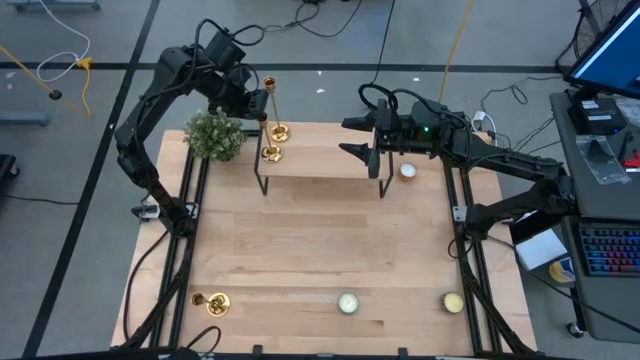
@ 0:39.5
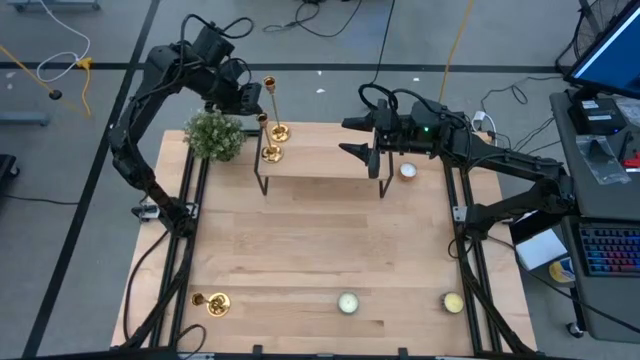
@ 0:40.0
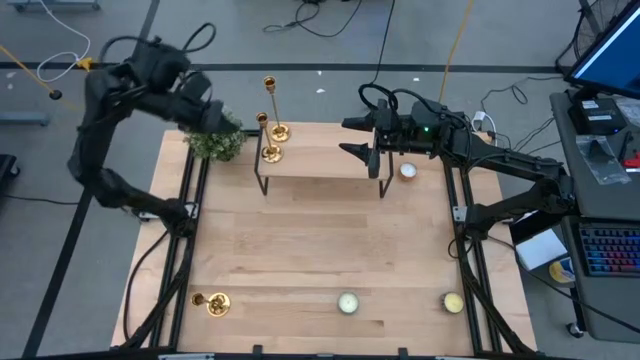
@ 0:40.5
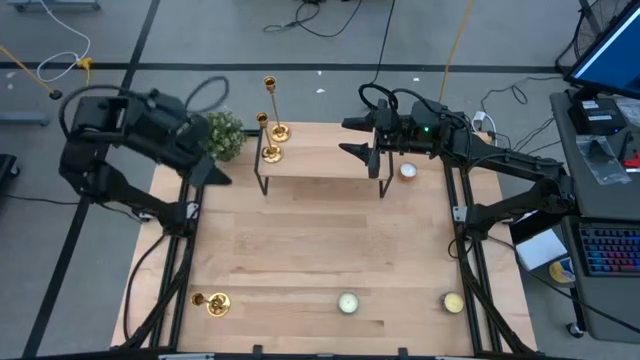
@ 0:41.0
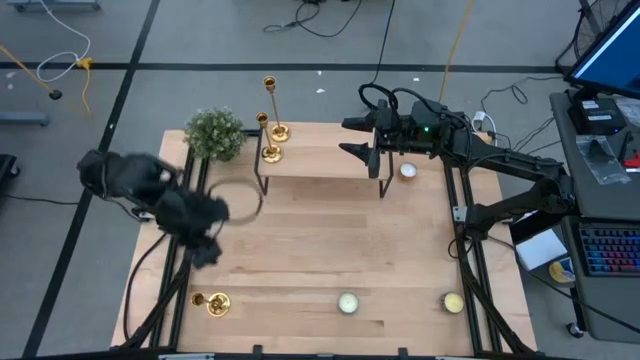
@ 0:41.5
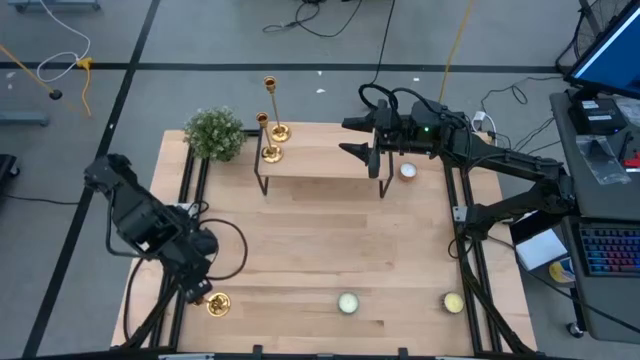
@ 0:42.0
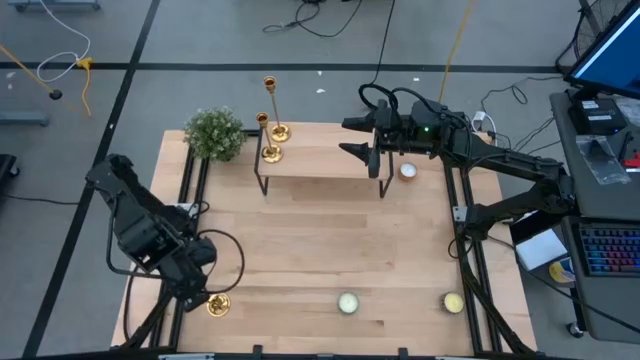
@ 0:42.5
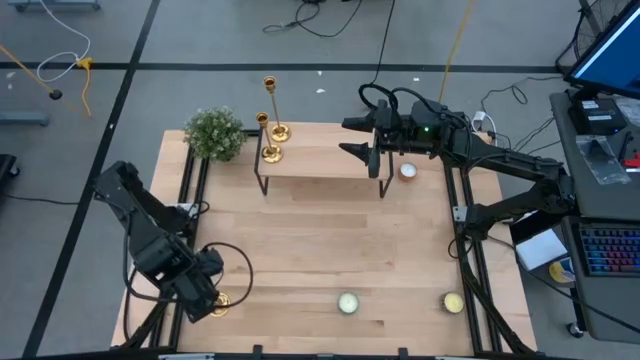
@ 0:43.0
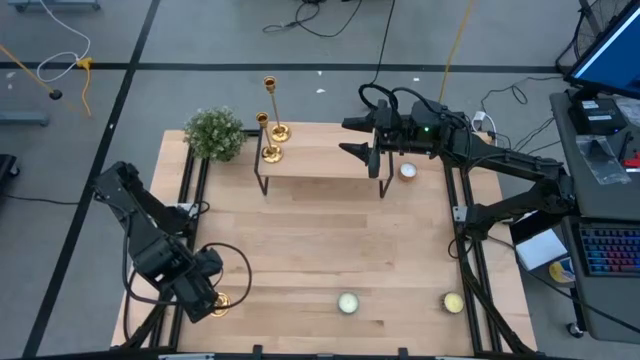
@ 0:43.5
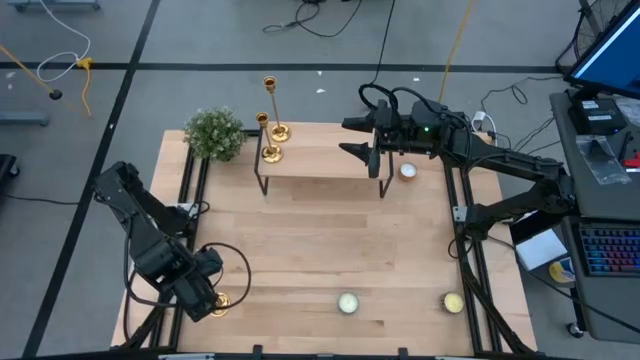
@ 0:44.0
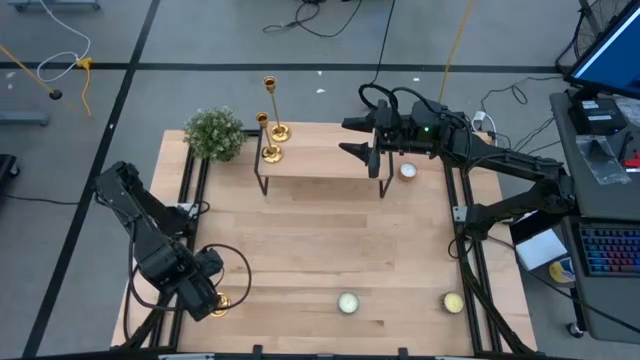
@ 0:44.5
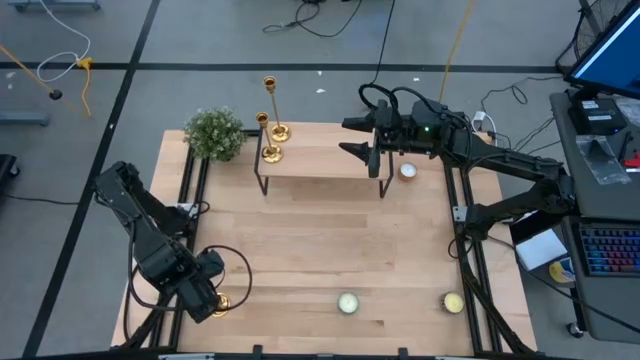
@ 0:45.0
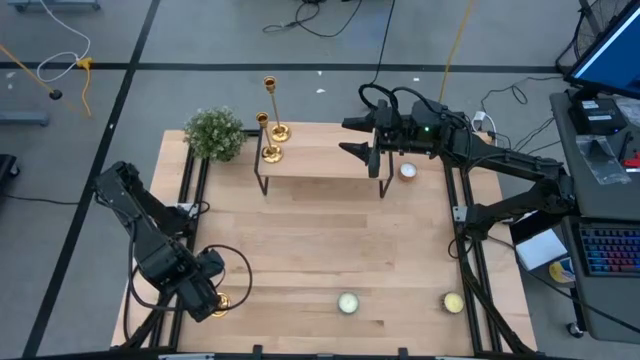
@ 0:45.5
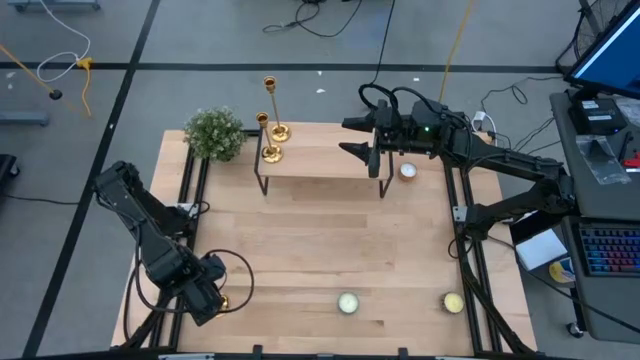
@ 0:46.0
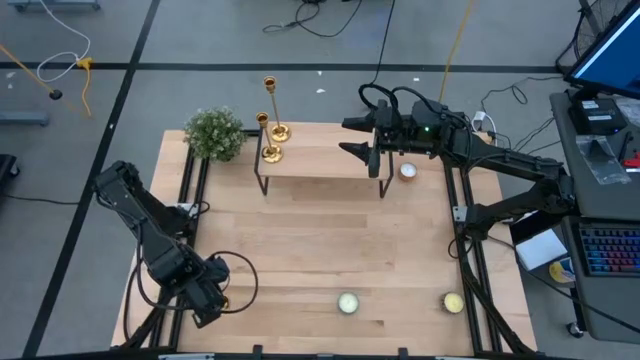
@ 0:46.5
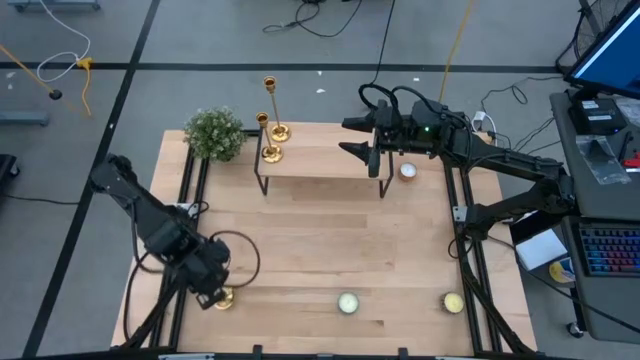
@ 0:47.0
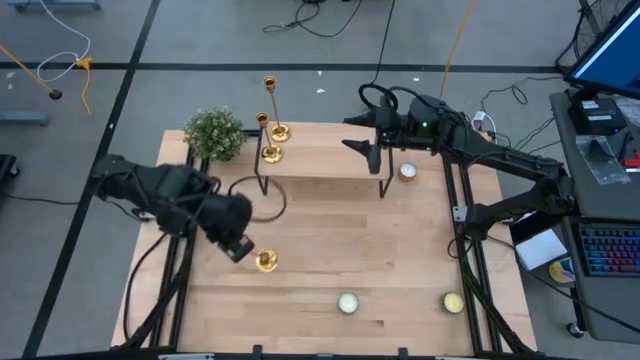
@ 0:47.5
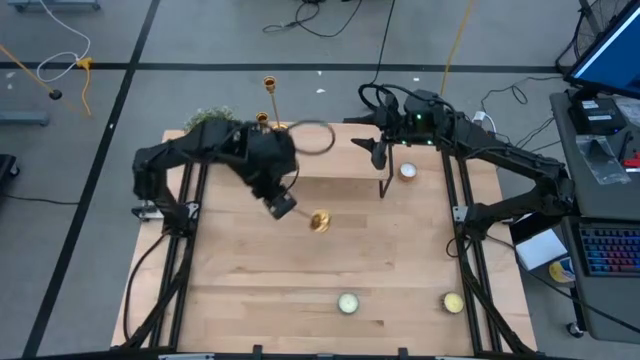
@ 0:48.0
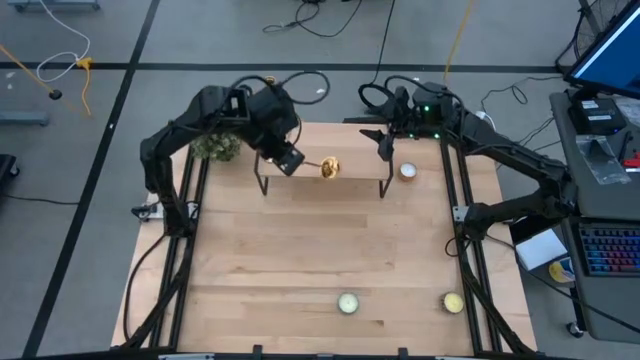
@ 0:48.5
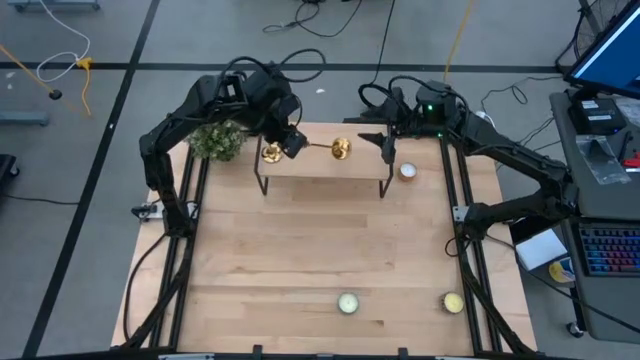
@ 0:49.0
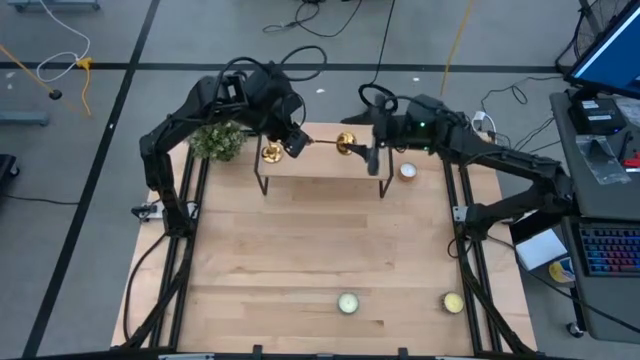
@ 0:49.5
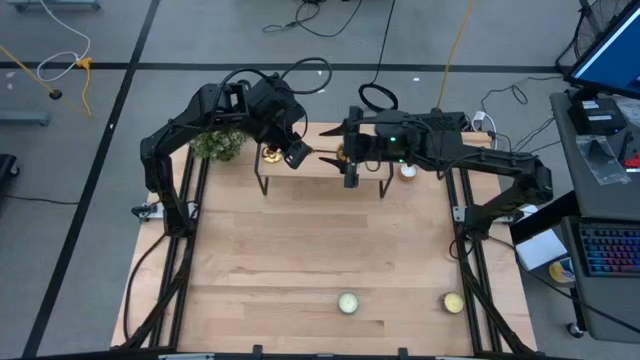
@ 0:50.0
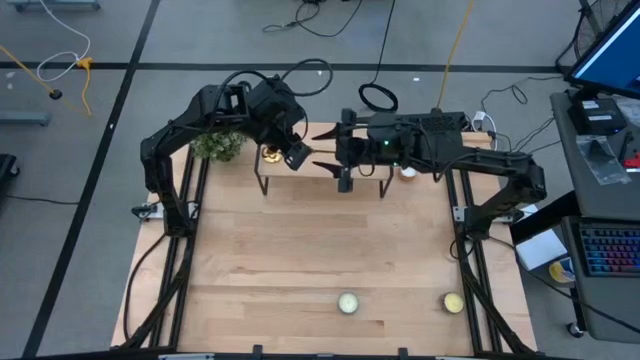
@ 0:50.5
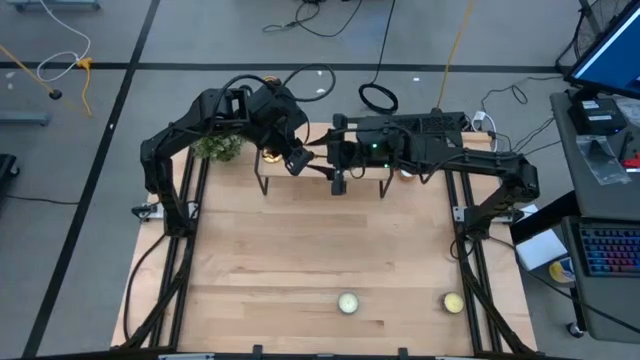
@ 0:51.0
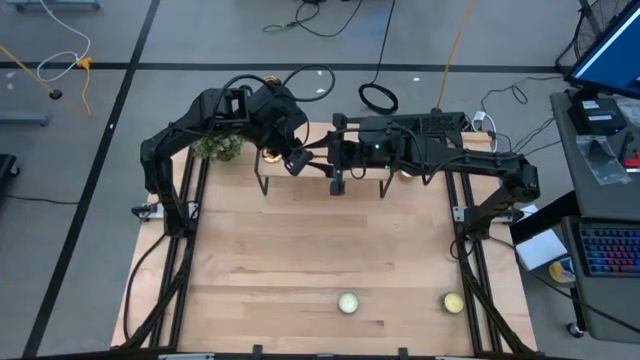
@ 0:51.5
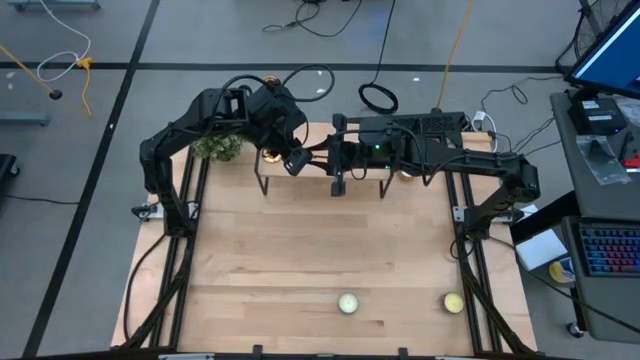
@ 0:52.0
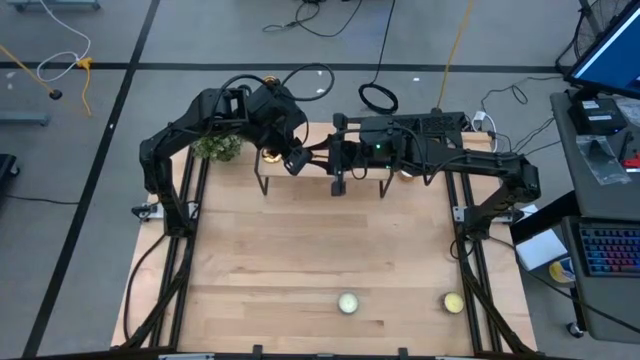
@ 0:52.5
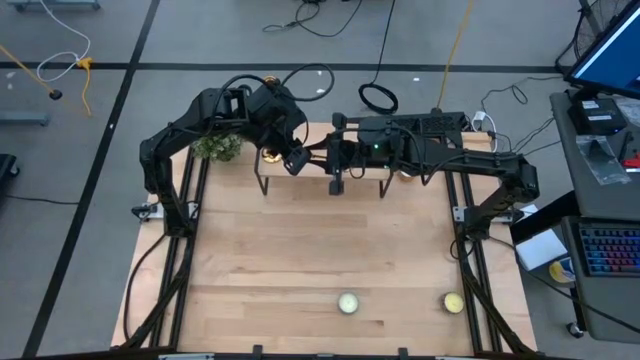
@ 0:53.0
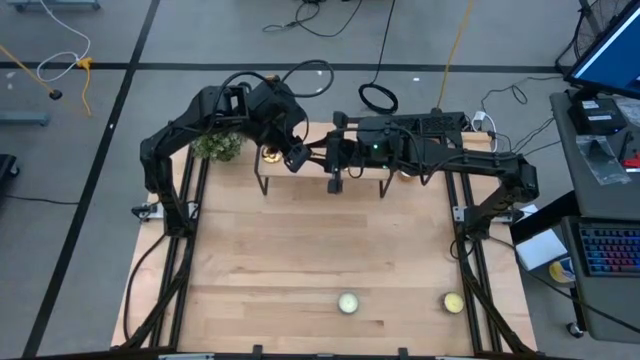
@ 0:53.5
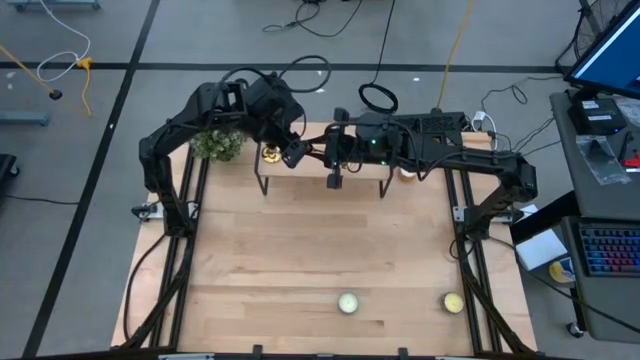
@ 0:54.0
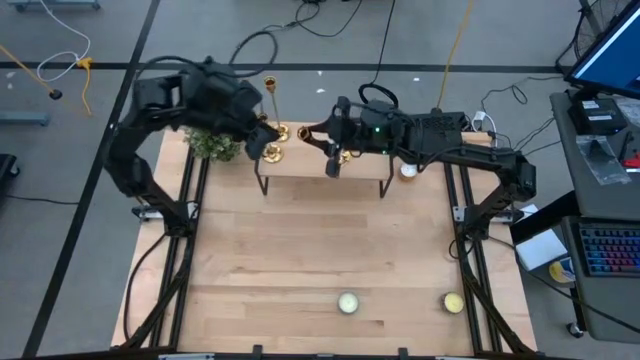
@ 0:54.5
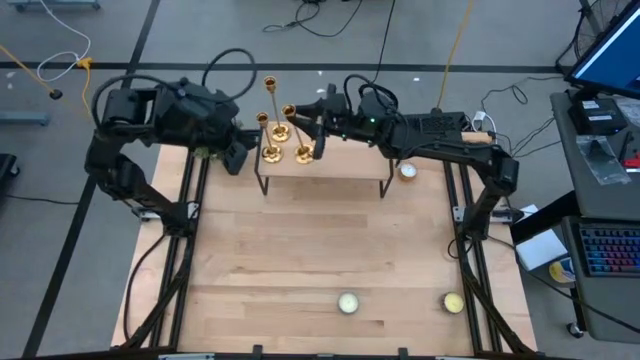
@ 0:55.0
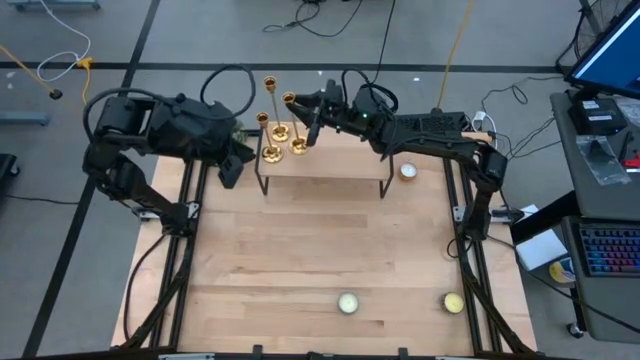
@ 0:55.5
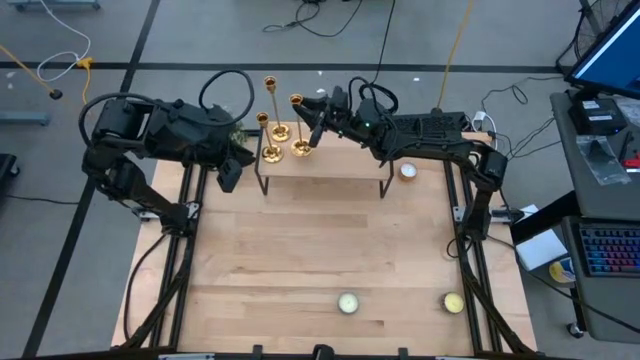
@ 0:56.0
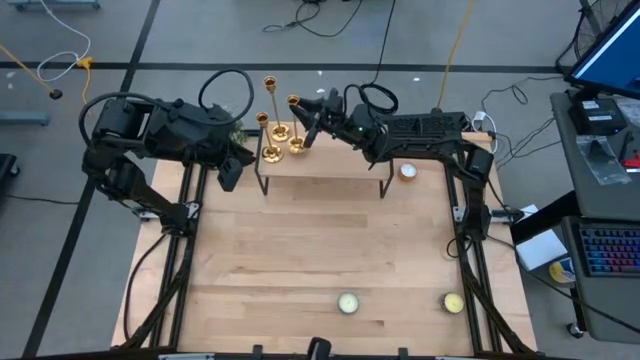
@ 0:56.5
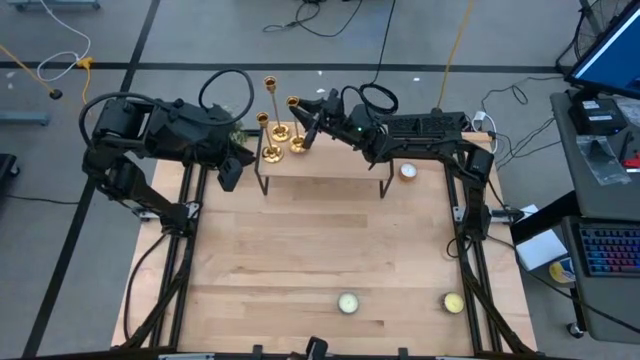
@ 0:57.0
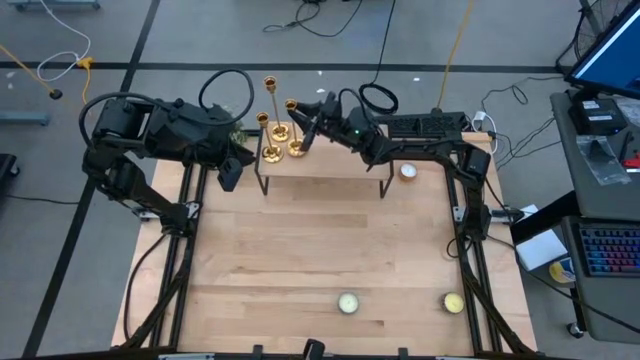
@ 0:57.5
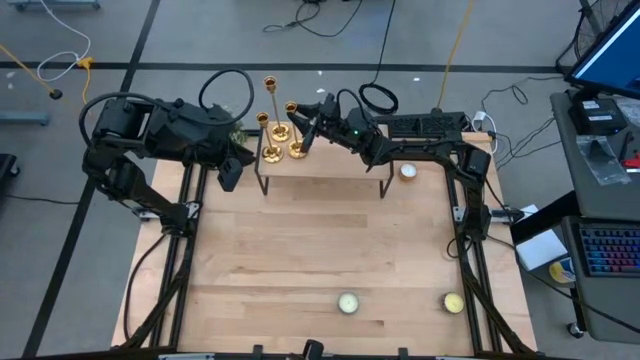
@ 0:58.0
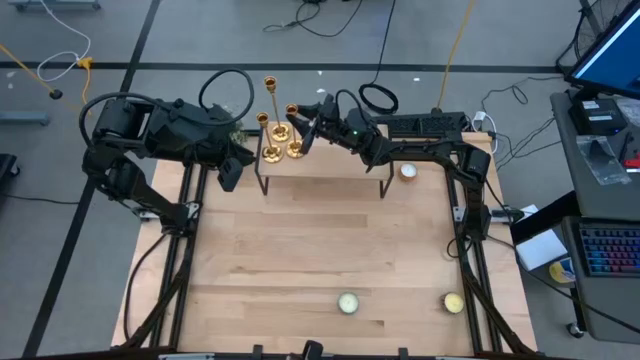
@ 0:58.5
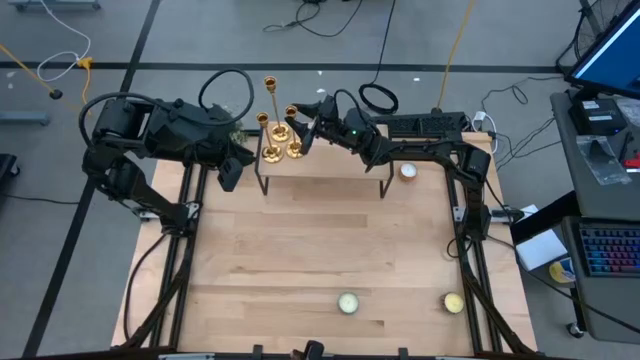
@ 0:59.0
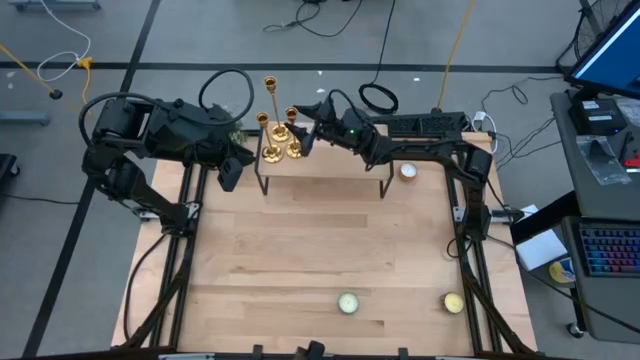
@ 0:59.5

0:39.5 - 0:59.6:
Task: Pick & Place candle stick holders
Put the gold candle holder on the shelf
